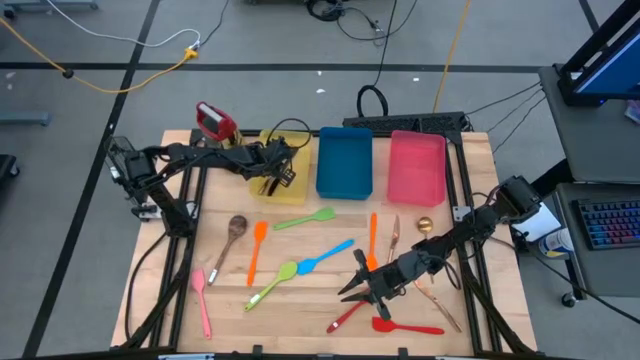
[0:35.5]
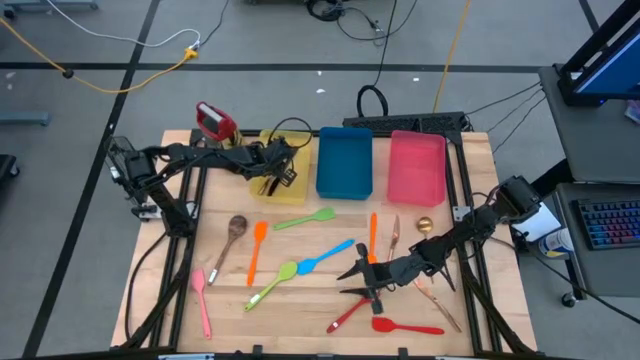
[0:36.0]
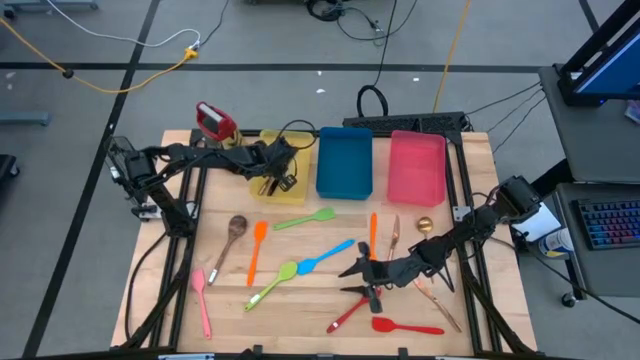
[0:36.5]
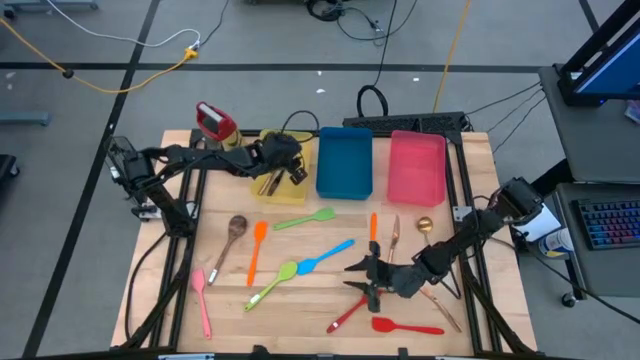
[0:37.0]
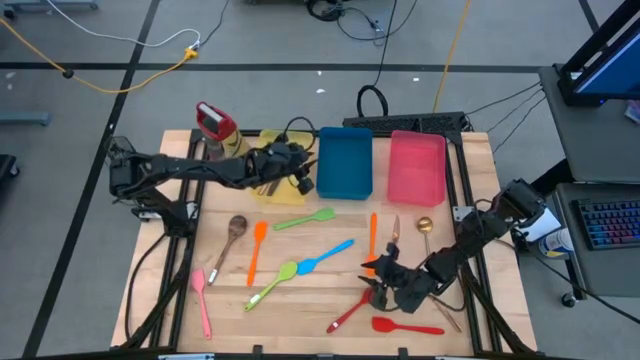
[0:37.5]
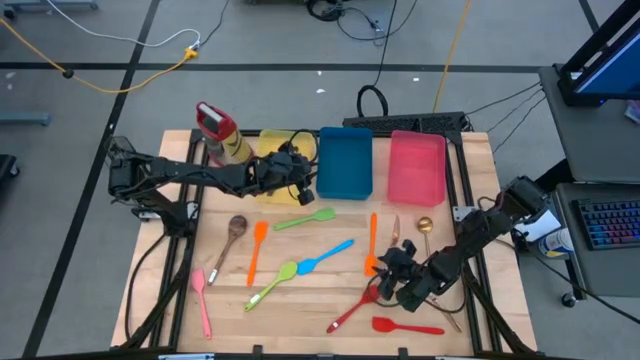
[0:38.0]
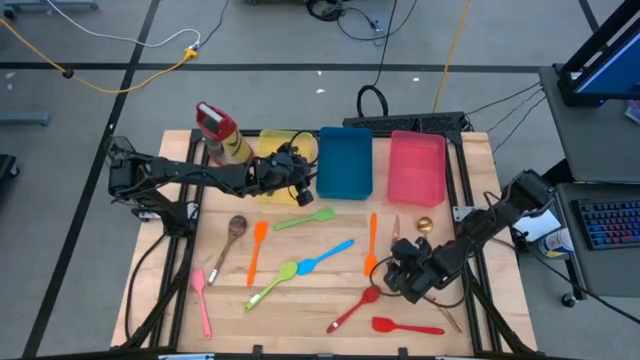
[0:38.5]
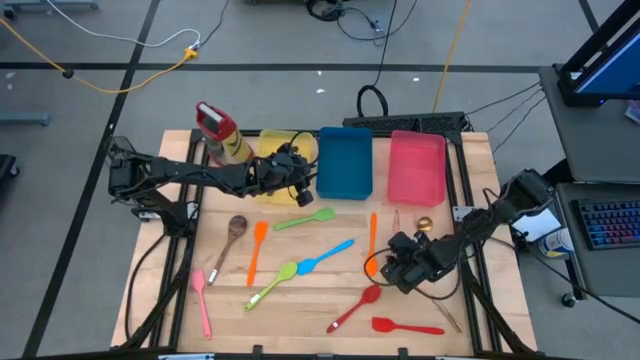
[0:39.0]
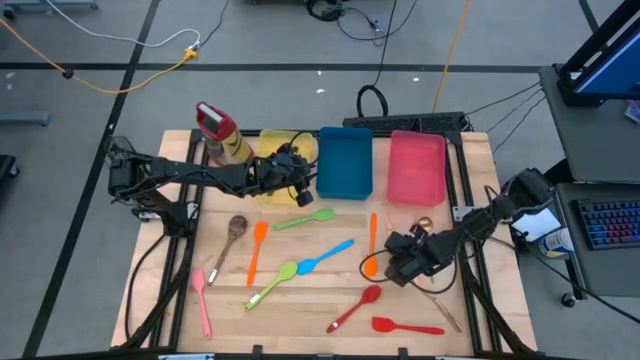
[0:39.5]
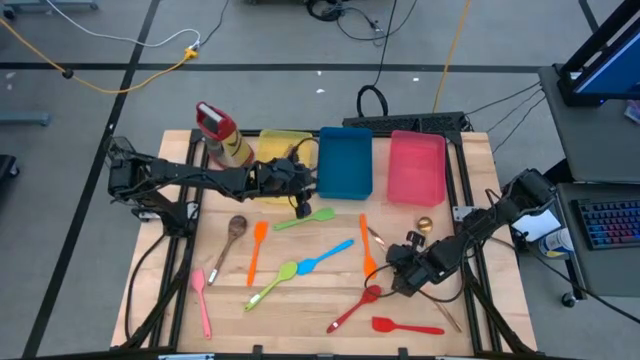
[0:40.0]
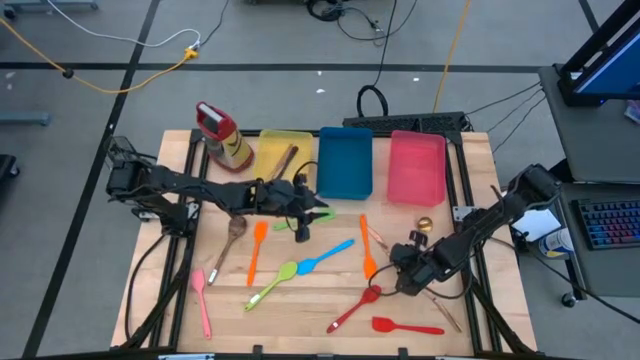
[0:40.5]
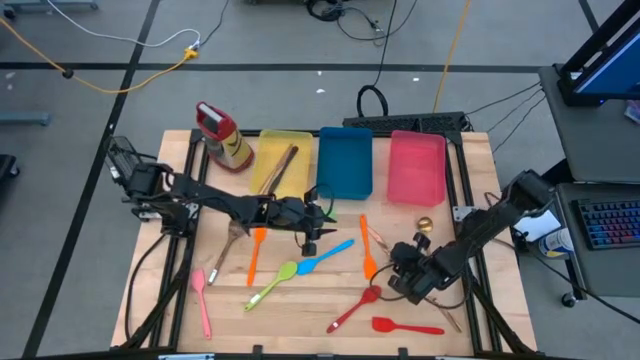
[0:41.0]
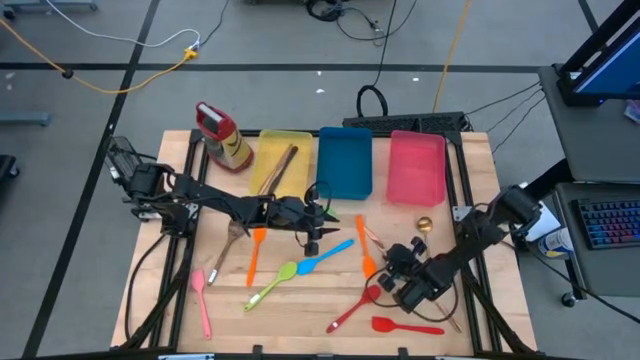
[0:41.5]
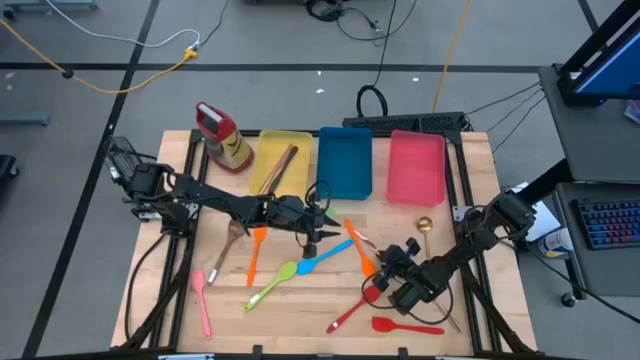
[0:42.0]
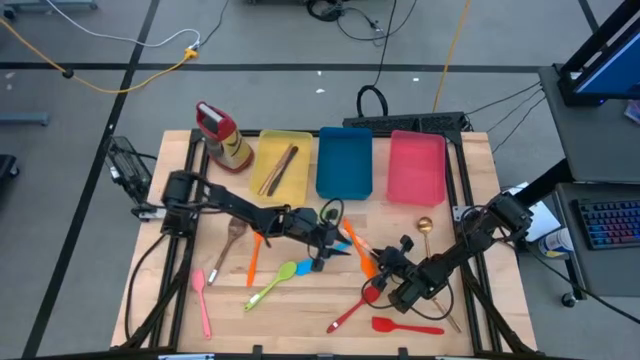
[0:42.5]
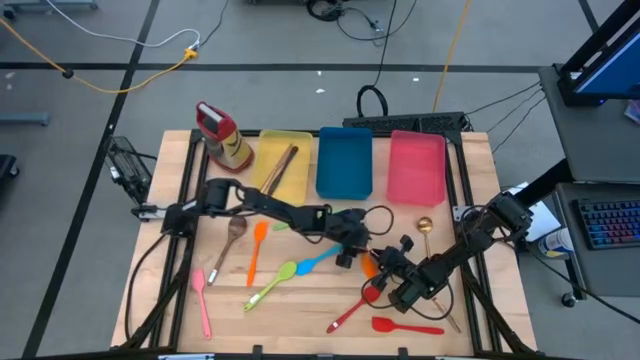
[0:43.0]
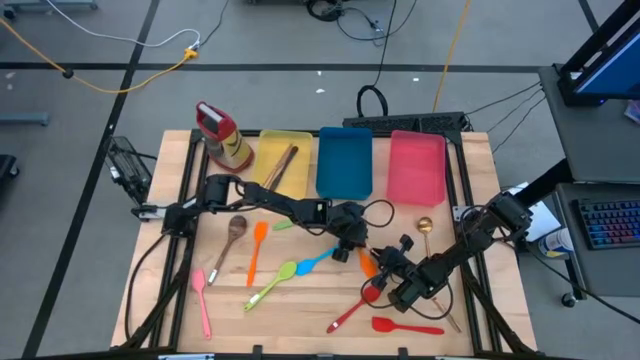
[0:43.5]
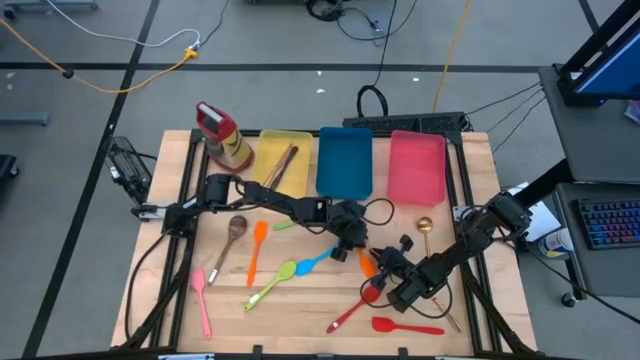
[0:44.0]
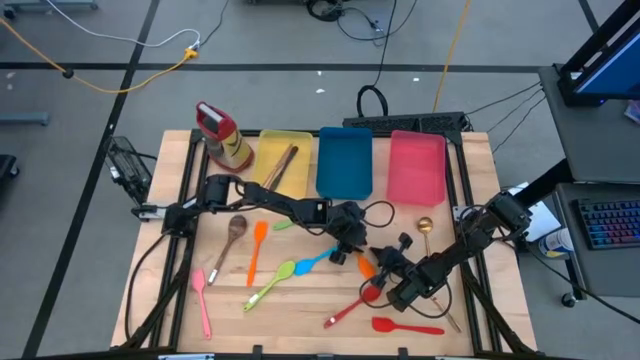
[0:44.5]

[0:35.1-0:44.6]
Task: Pick & Place Kitchen Items
Put the top bronze knife into the yellow bin

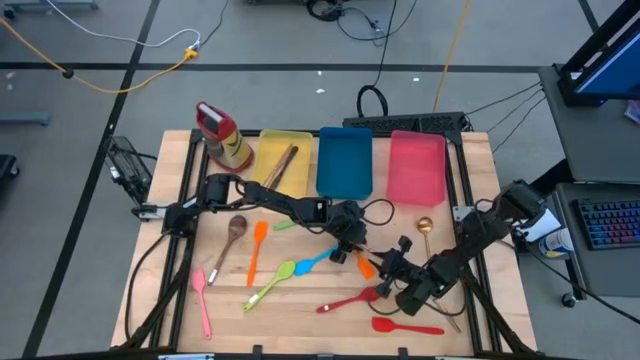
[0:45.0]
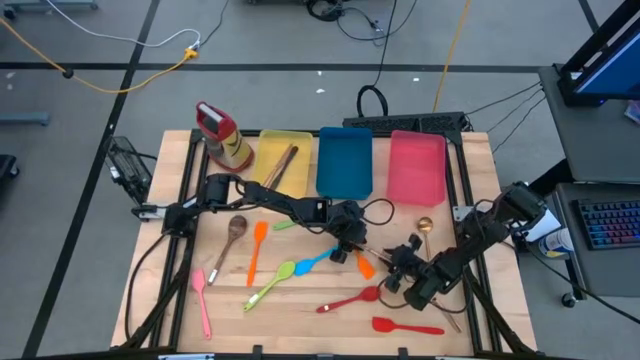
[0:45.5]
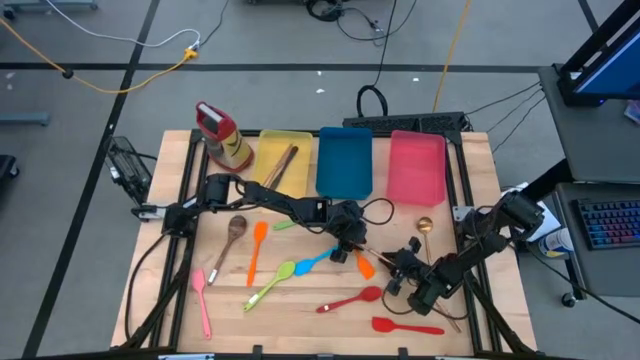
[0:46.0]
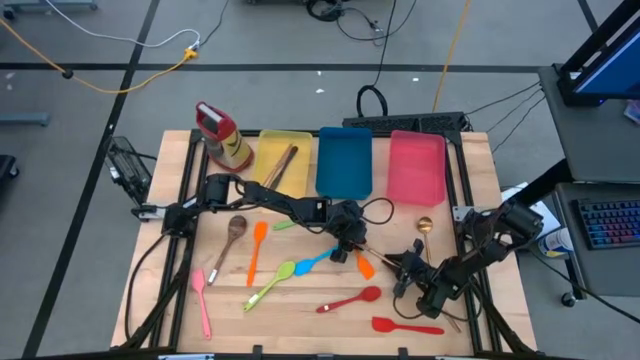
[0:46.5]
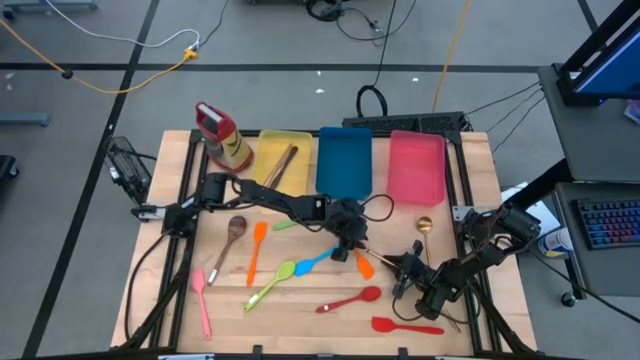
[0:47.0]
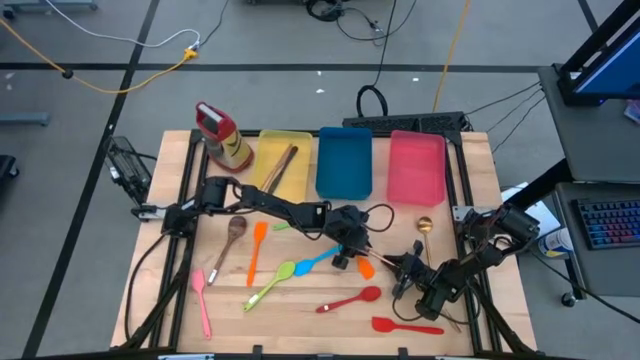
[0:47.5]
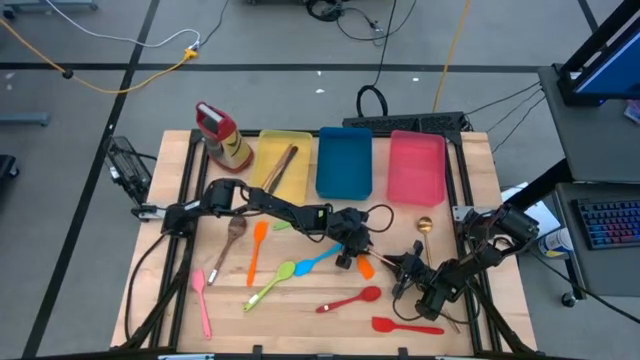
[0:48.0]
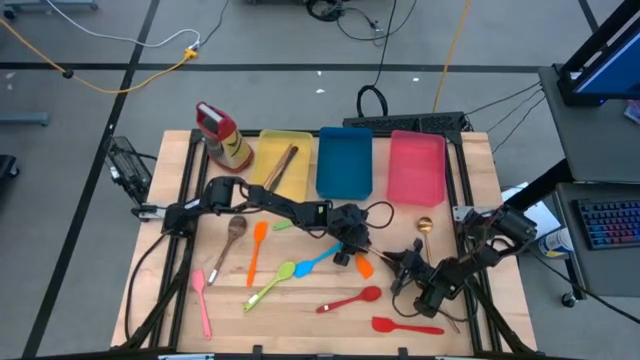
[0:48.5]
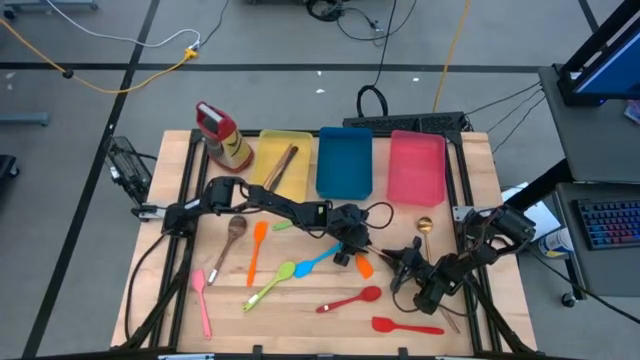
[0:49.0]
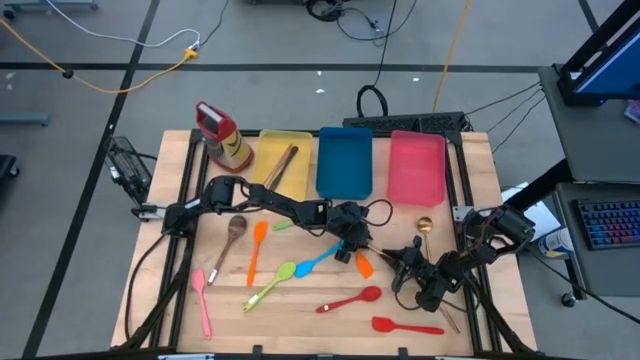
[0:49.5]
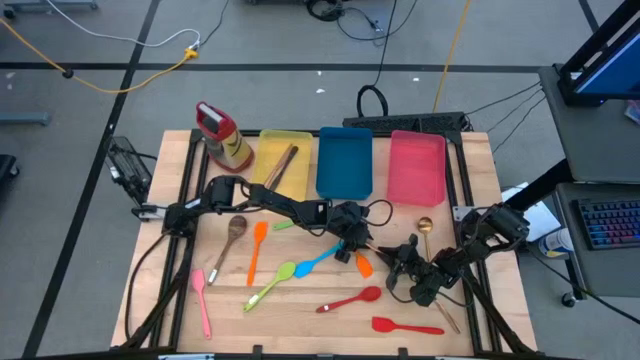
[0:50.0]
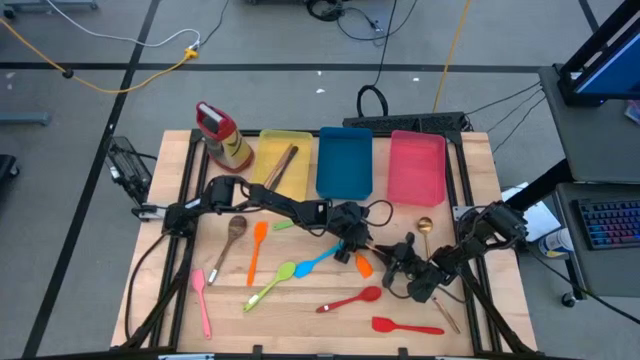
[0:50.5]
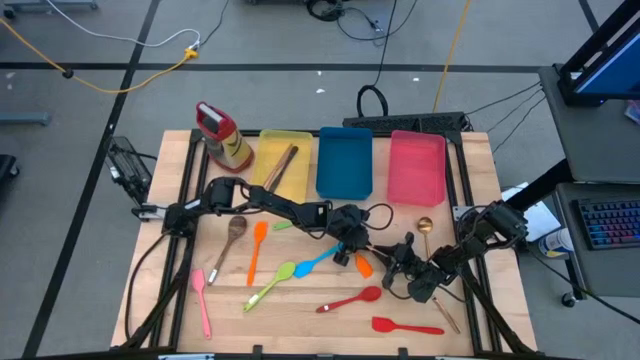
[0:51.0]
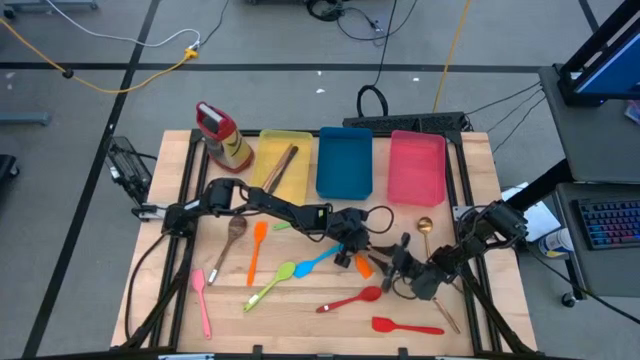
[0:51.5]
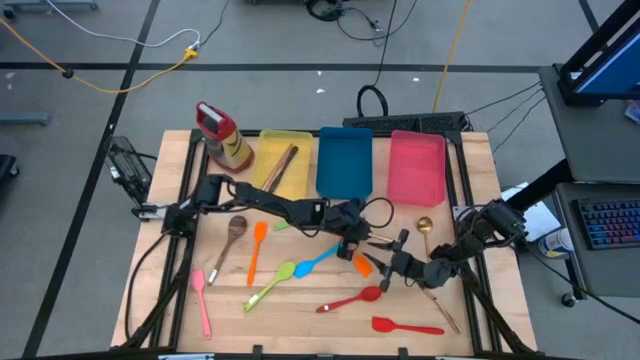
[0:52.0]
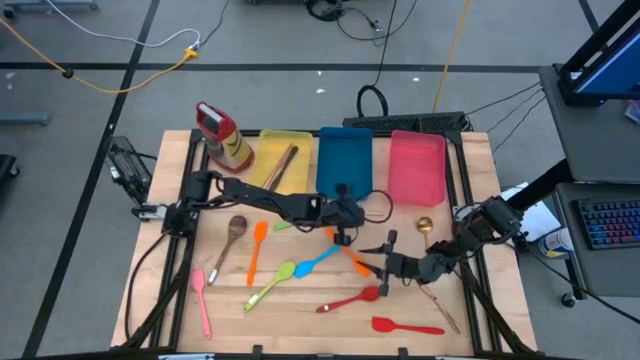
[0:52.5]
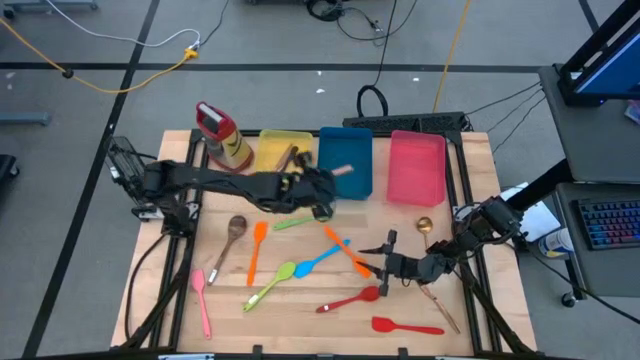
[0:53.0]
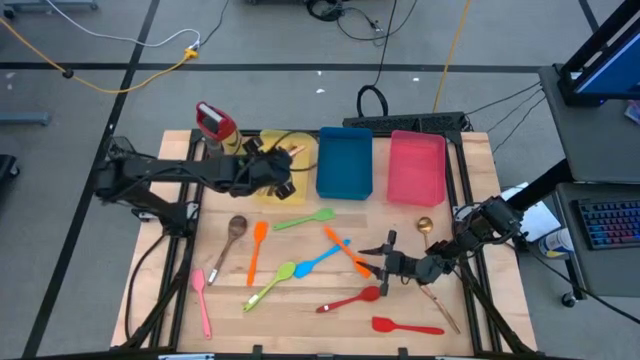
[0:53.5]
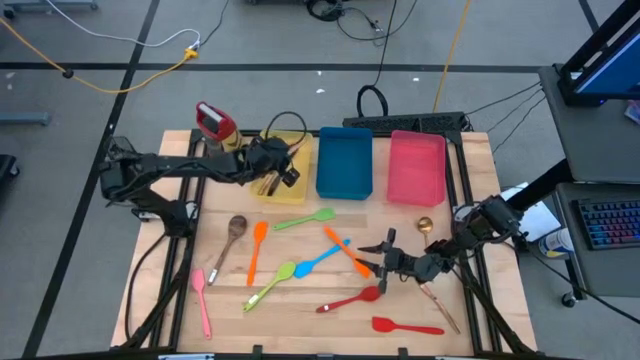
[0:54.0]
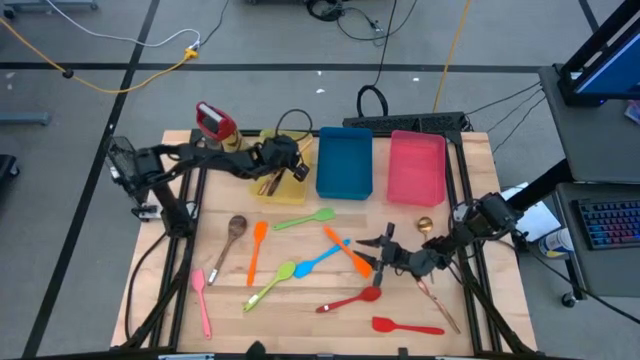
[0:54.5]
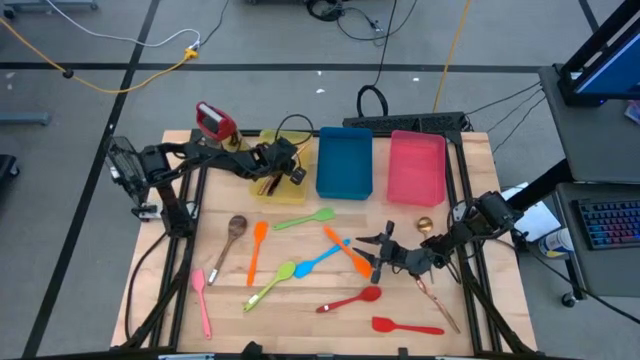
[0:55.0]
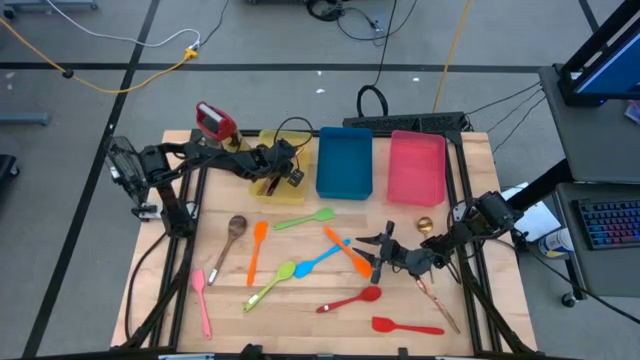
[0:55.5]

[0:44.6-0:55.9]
Put the top bronze knife into the yellow

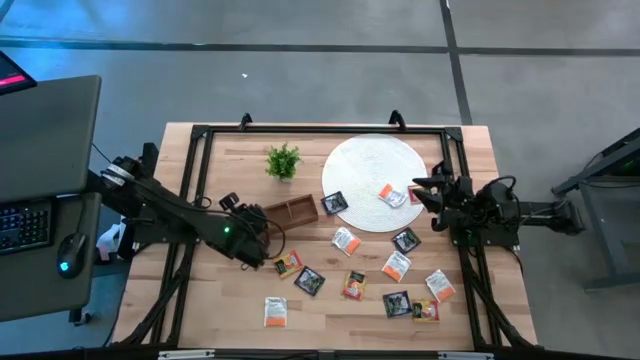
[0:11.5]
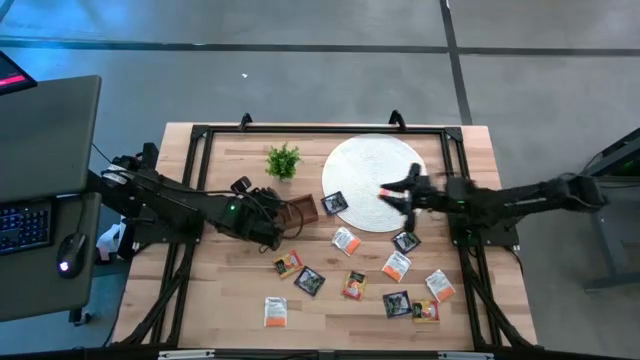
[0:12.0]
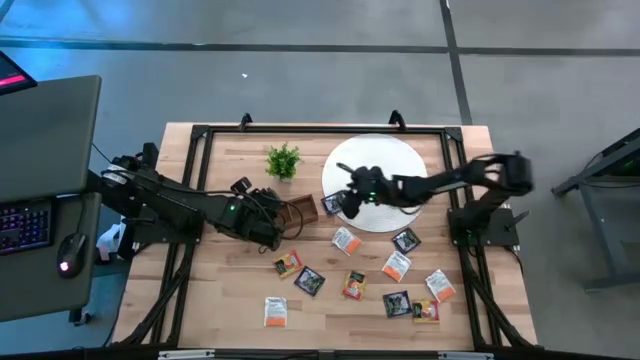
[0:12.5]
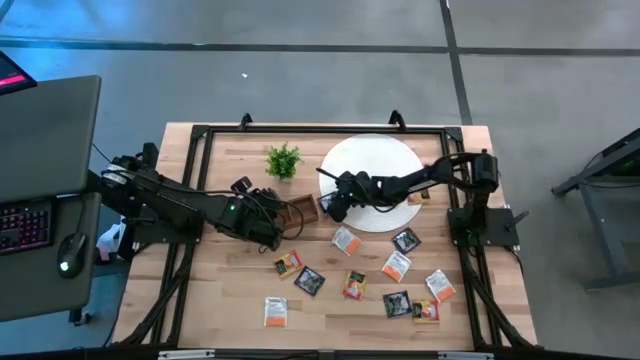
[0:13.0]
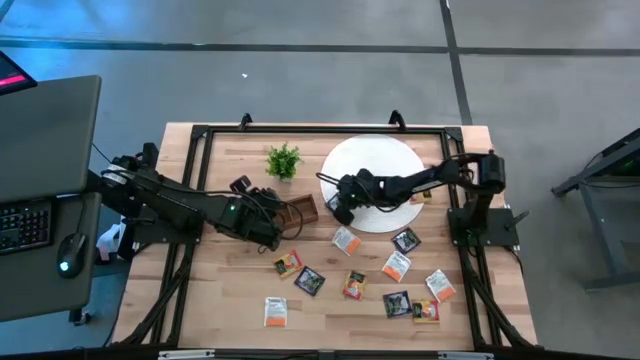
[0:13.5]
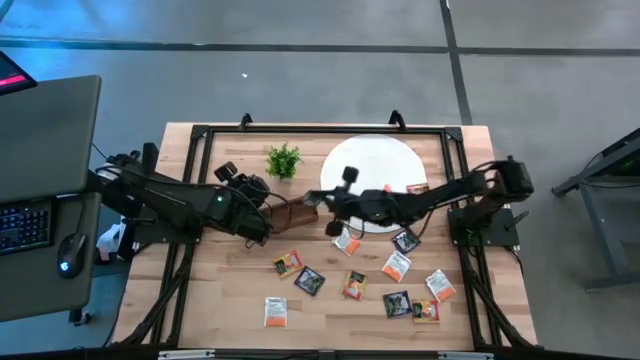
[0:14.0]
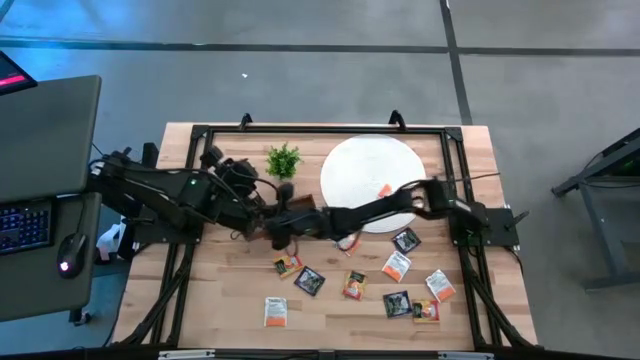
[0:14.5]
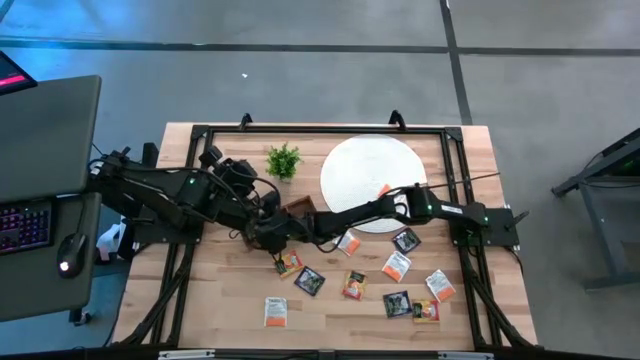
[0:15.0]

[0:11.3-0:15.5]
Task: Pick & Place Tea
Put the purple tea bag into the left section of the wooden organizer
